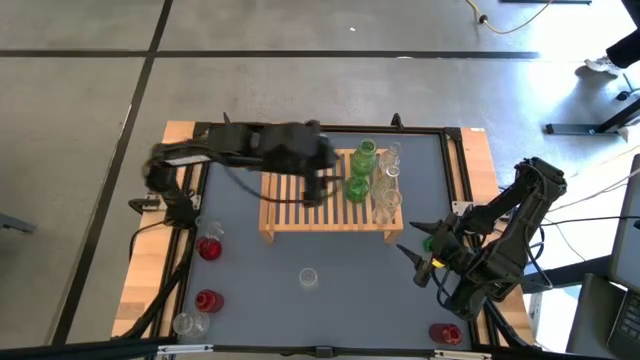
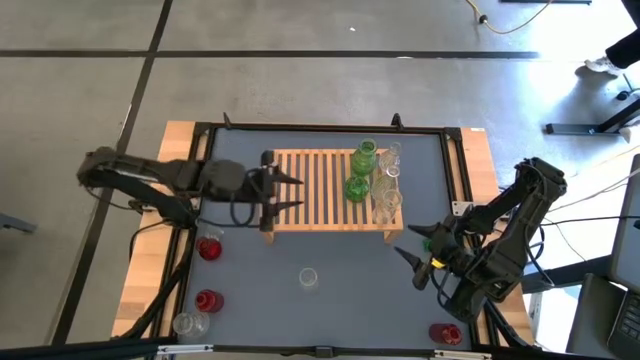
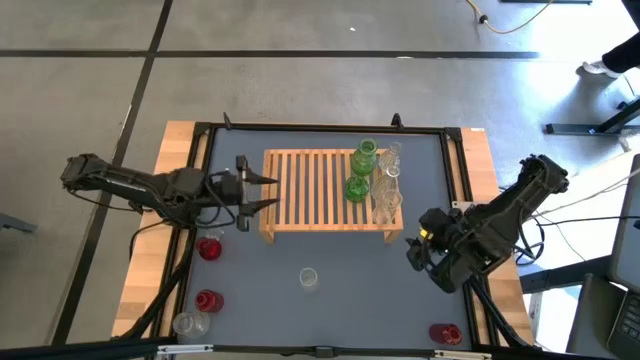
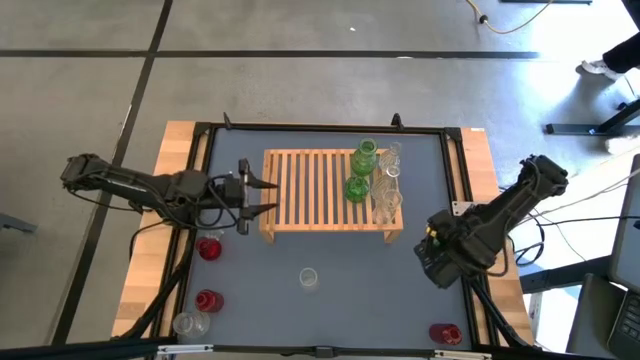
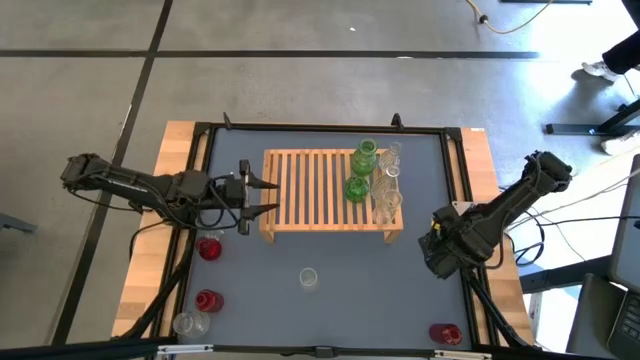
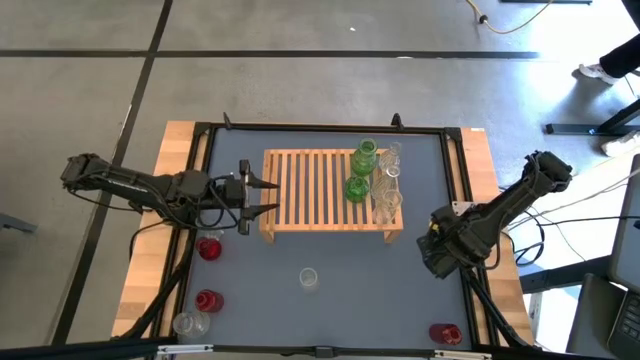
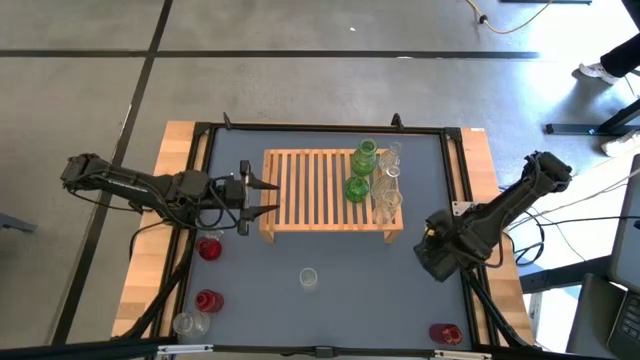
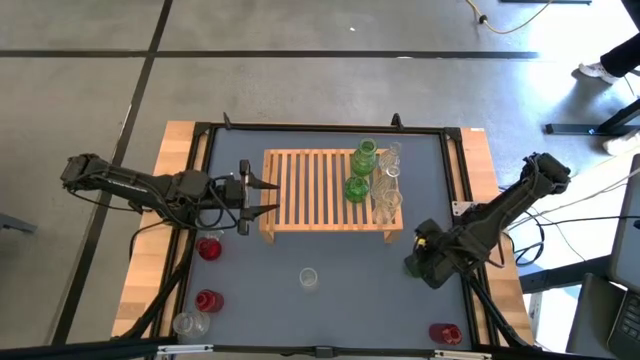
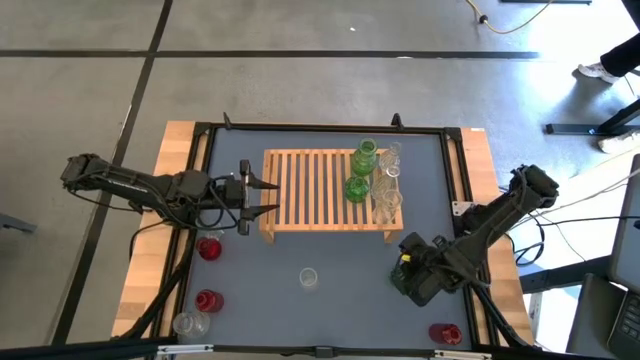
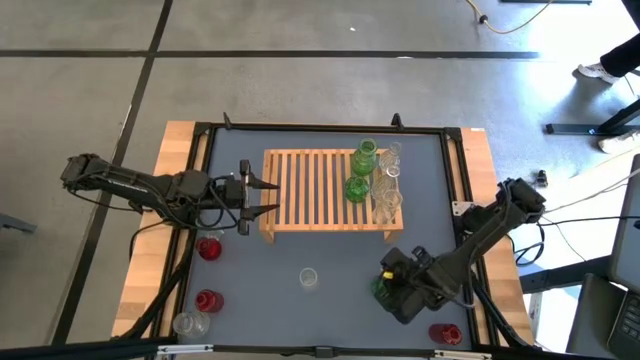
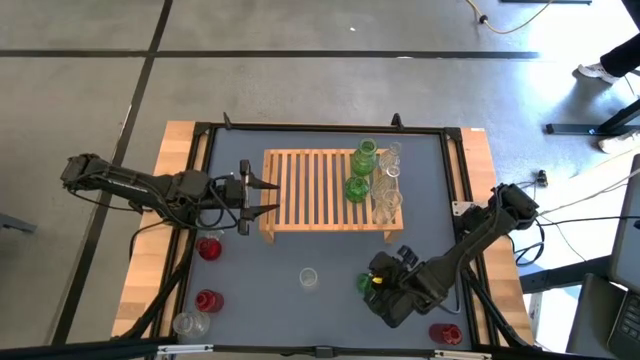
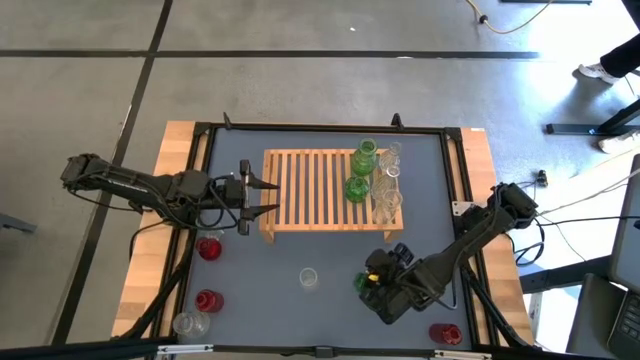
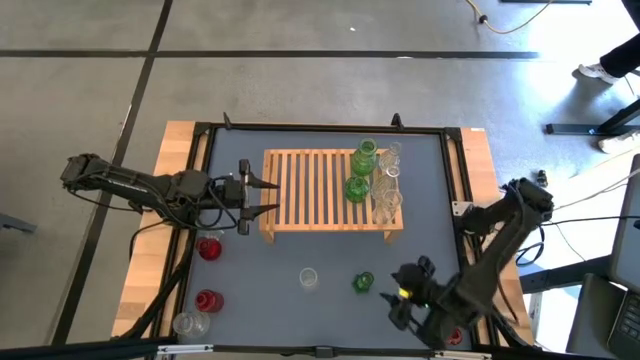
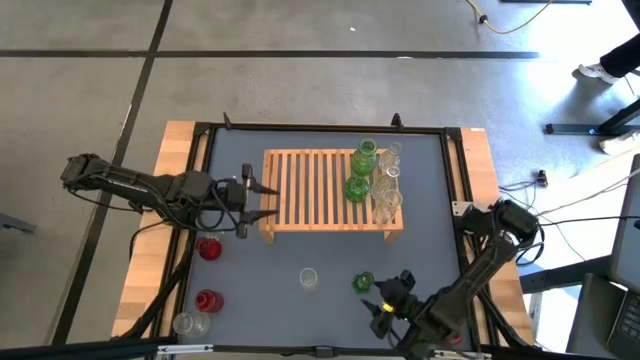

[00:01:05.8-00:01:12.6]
Task: sort vases onto shelf
Move the middle right green bottle to the middle

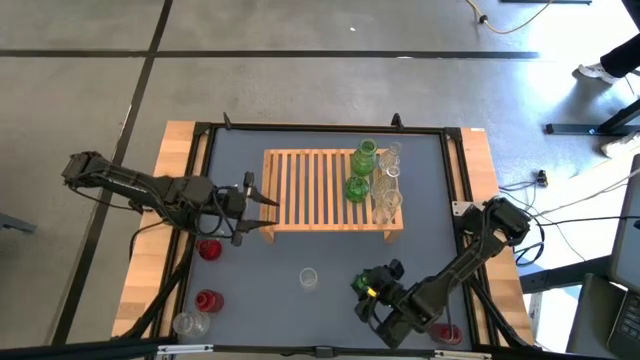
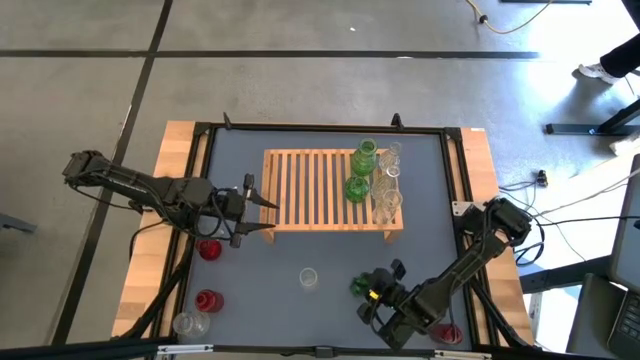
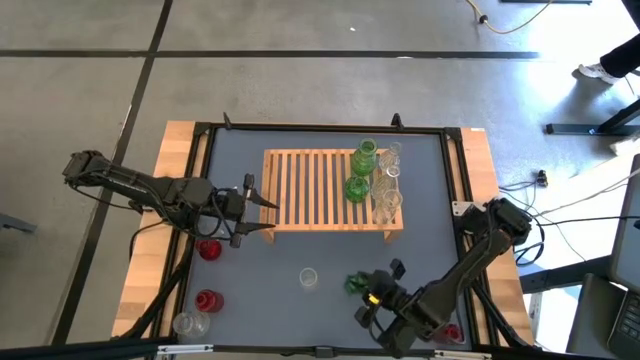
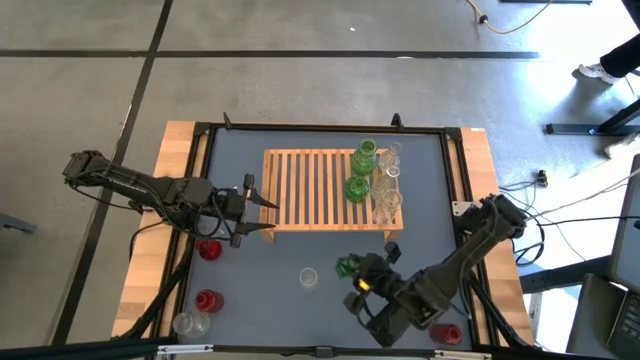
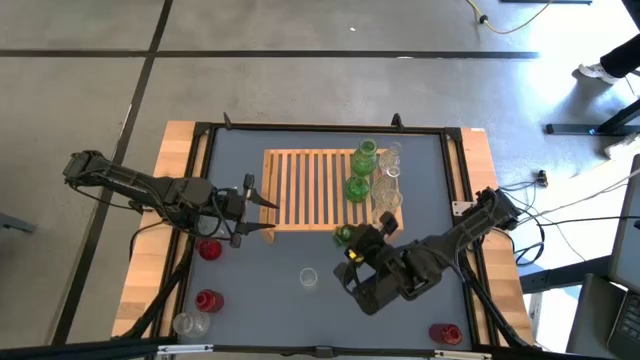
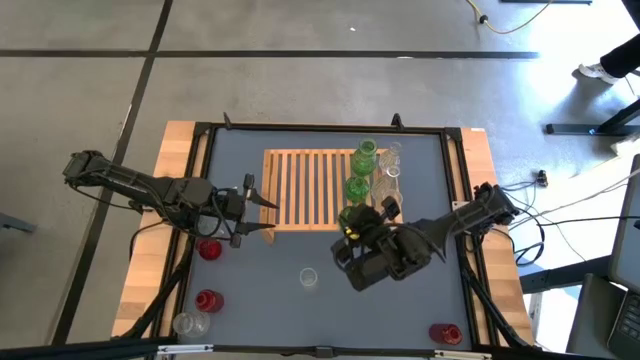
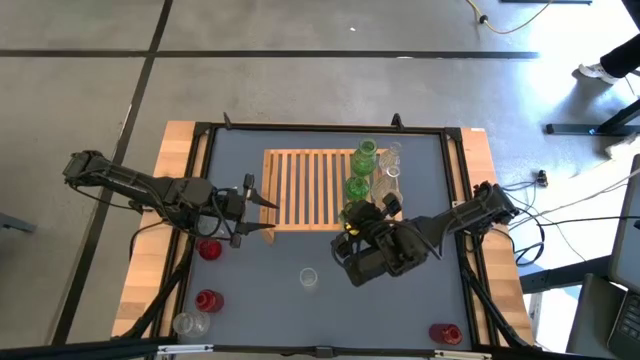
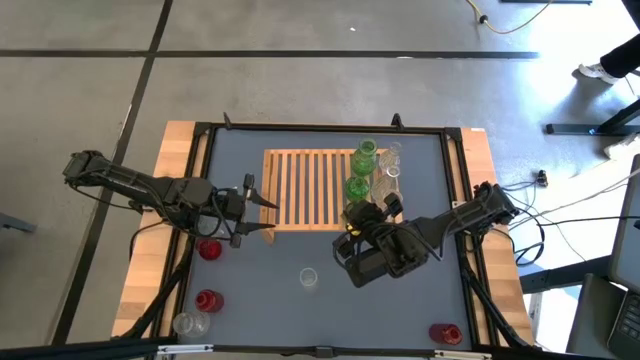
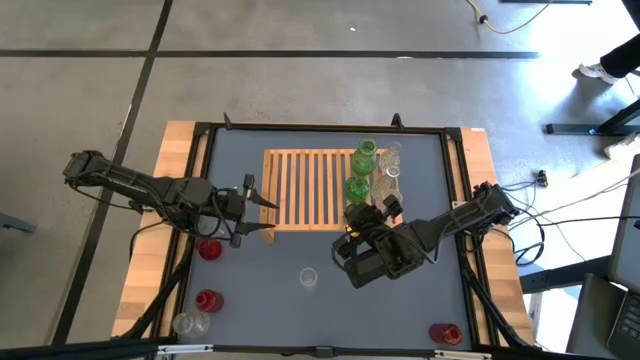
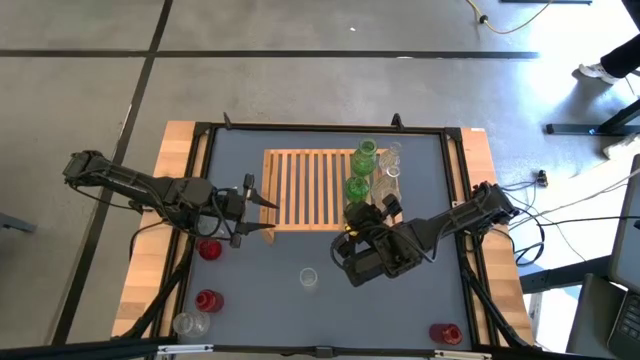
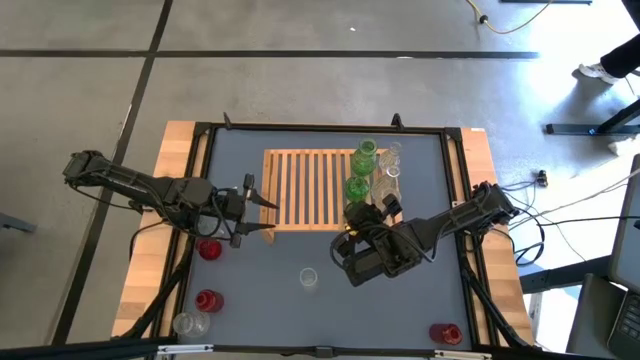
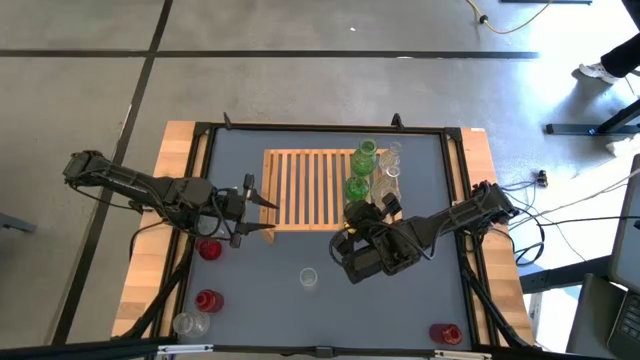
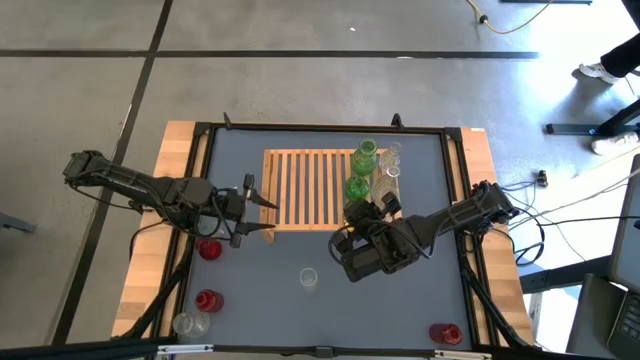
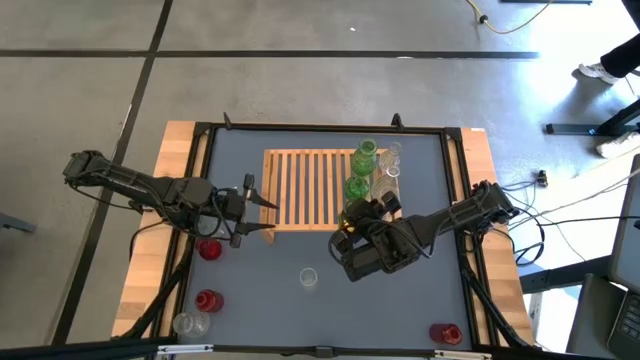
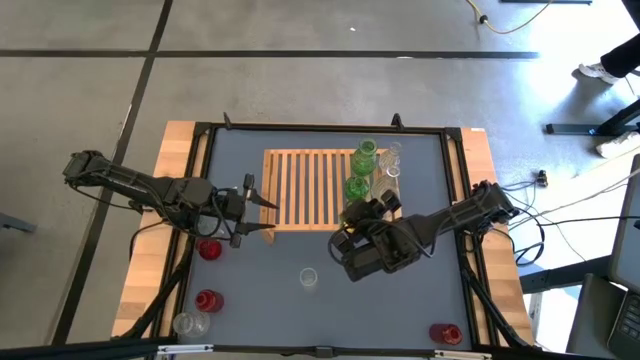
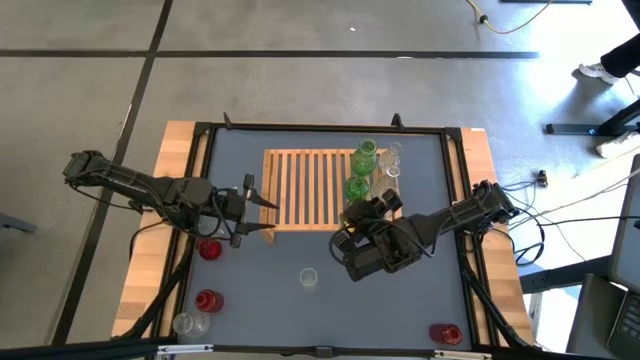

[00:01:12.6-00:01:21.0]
Put the green bottle on the shelf

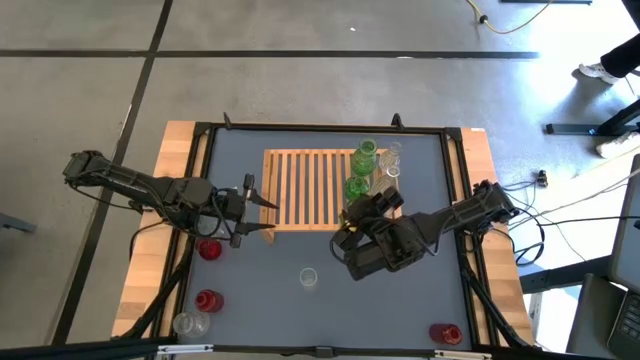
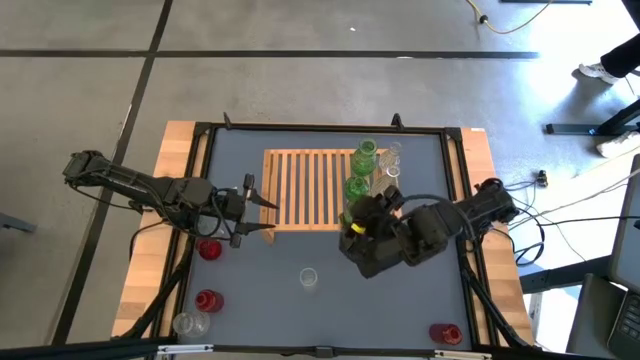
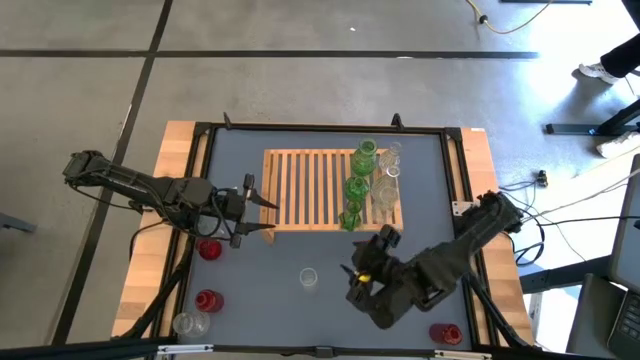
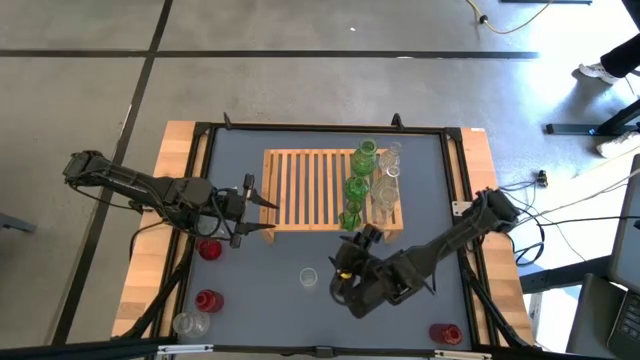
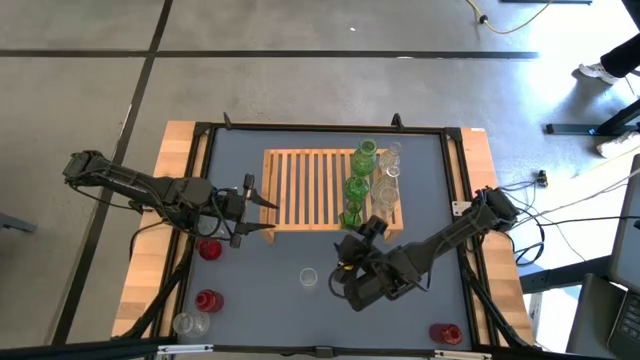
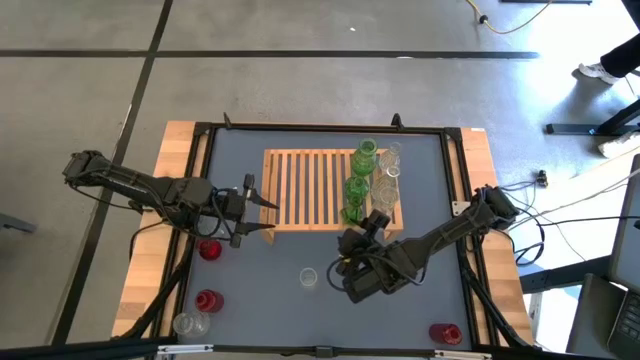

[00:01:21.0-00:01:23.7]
Adjust the green bottle on the shelf to align well

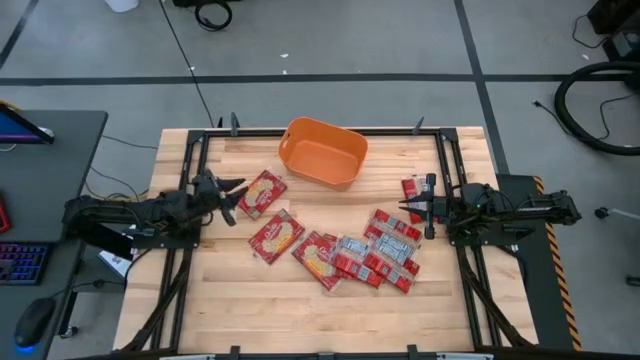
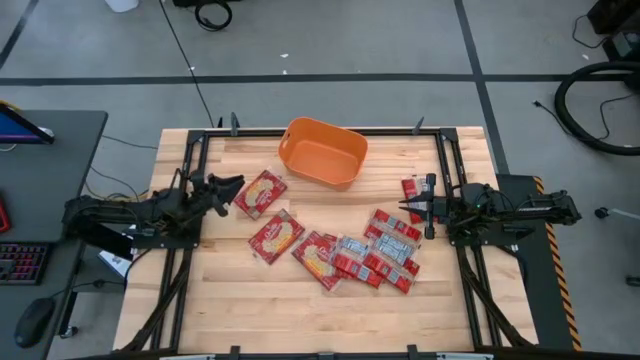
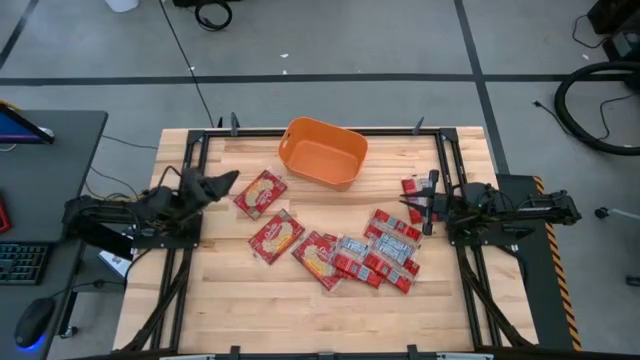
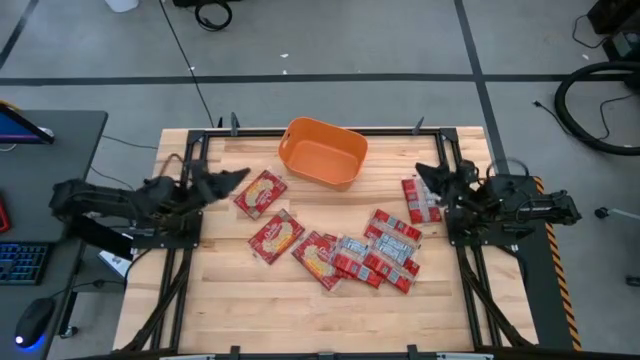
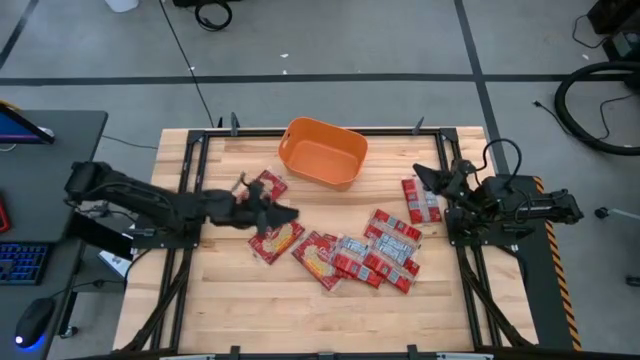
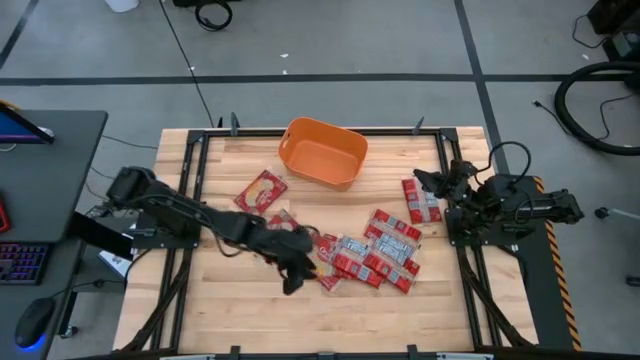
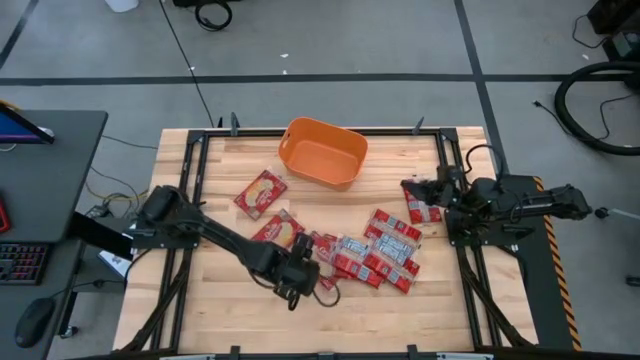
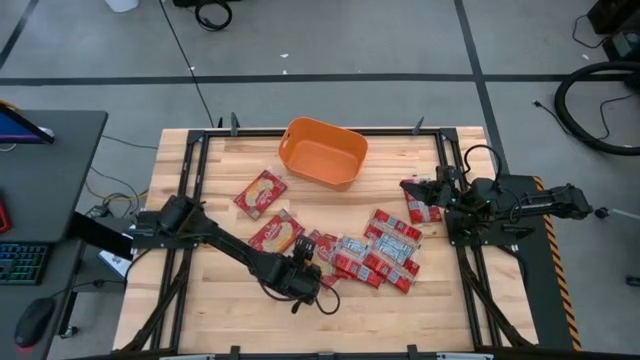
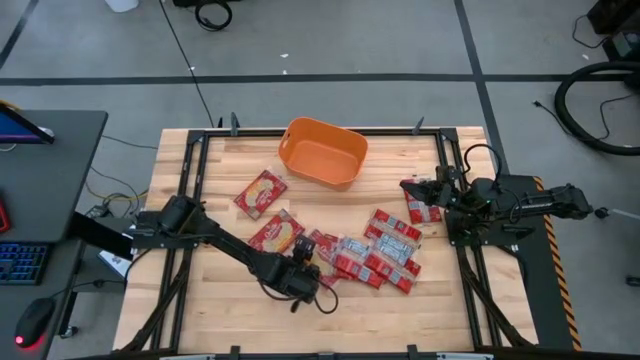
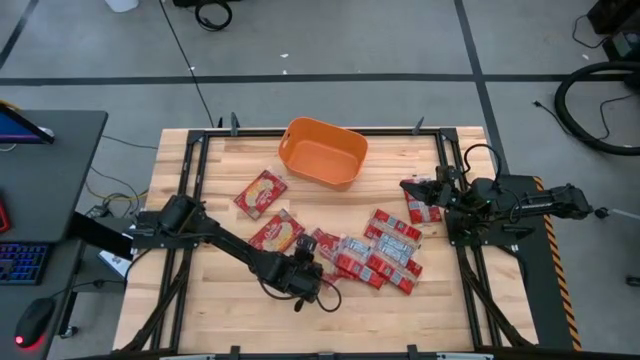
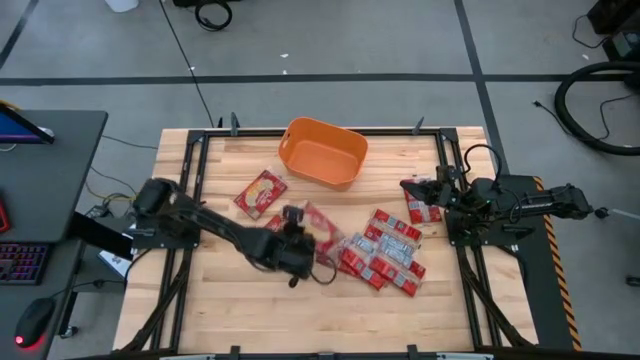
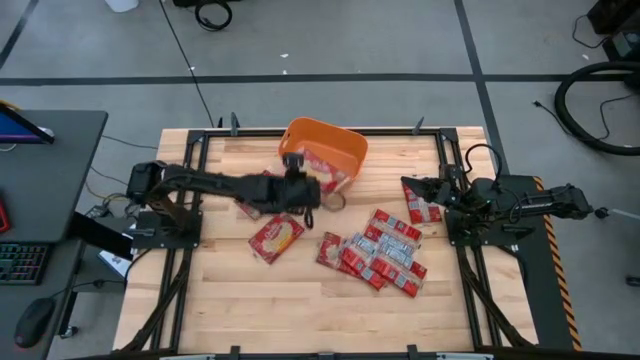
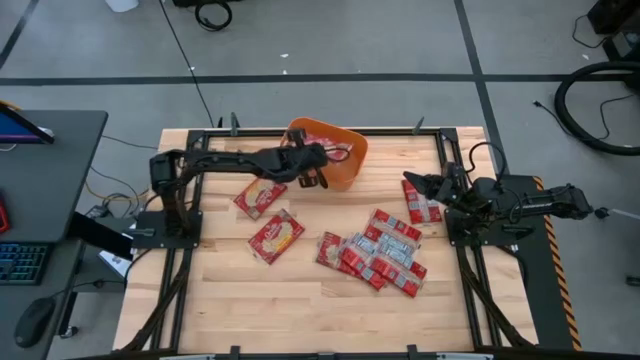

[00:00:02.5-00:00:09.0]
Task: Sort popcorn bags into baskets
Put the red popcorn bag into the orange bin
